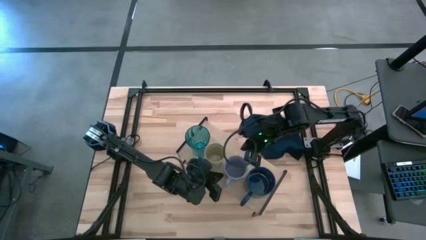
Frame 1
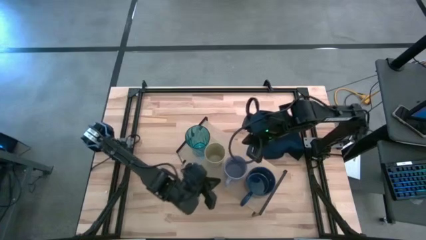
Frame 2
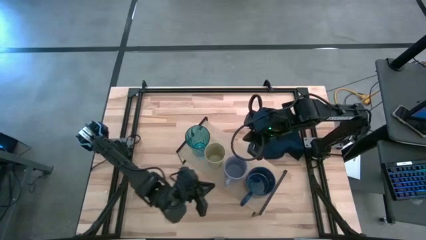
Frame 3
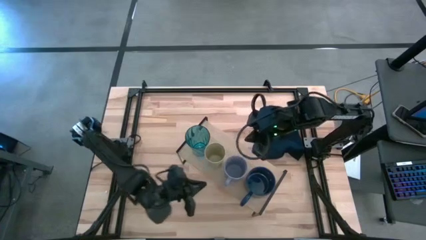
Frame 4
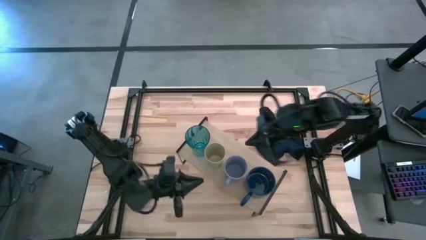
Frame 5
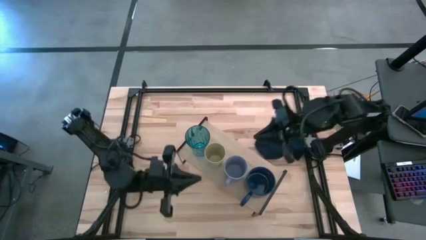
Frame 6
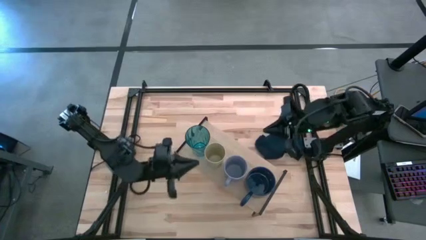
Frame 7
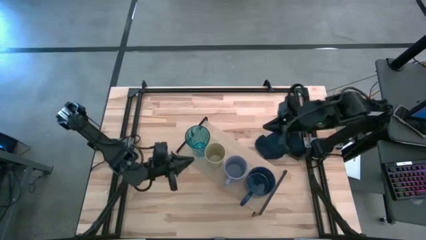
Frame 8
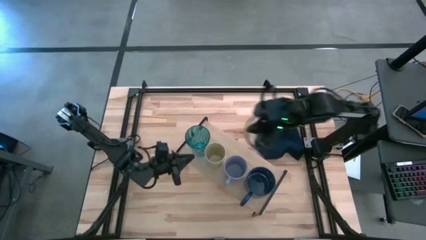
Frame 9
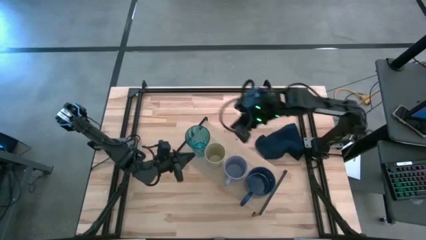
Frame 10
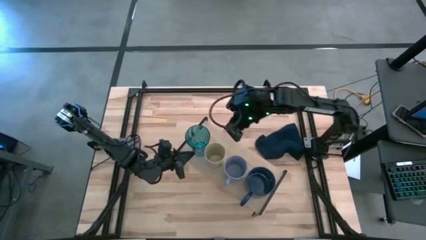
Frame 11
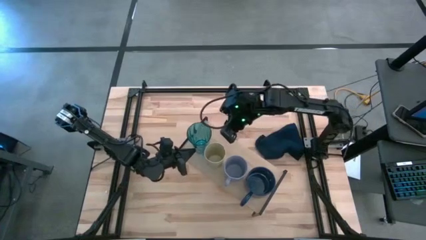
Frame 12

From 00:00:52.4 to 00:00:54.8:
Task: Stack small to large cups/mugs on shelf
Adjust the blue transparent cup on the shelf

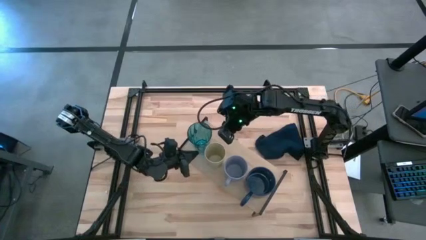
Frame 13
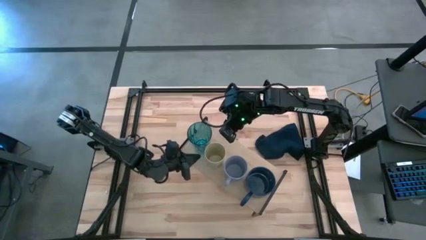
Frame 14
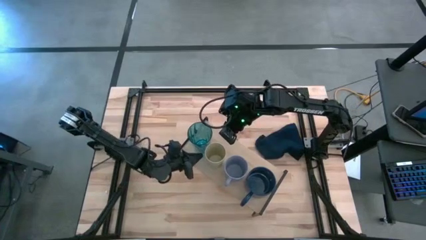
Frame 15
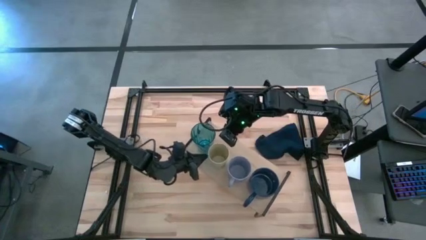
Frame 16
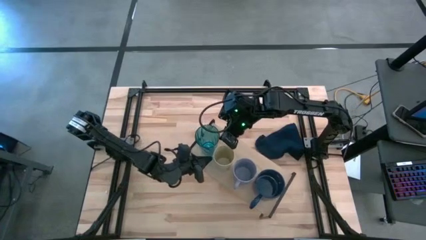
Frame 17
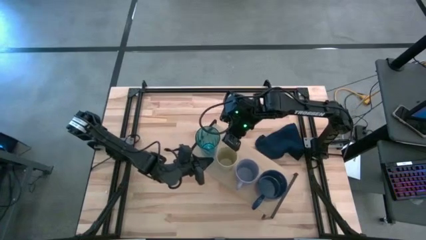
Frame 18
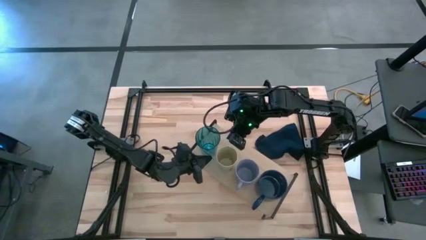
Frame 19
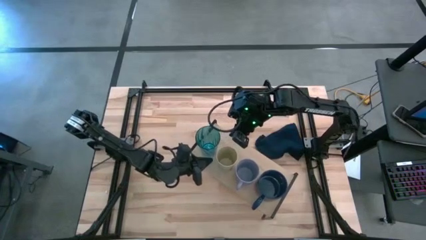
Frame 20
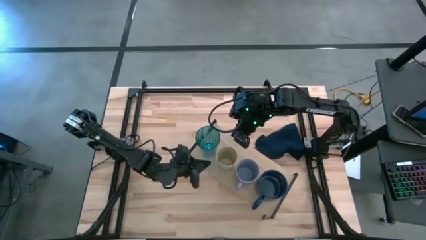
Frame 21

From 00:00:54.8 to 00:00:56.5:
Adjust the light brown shelf on the table

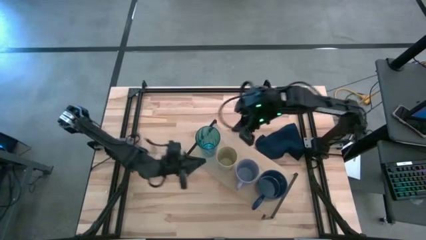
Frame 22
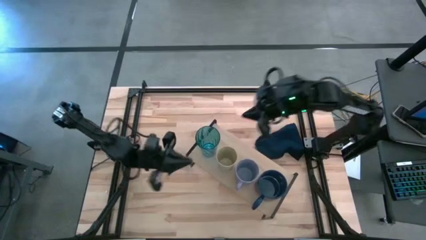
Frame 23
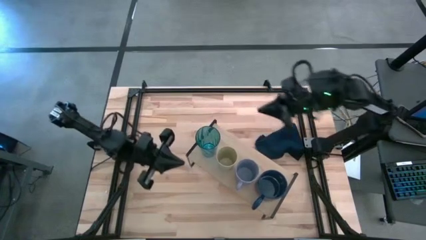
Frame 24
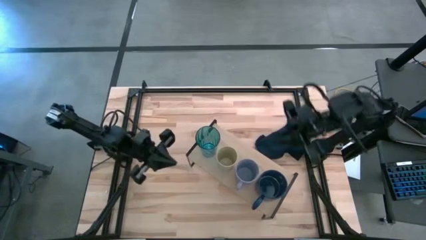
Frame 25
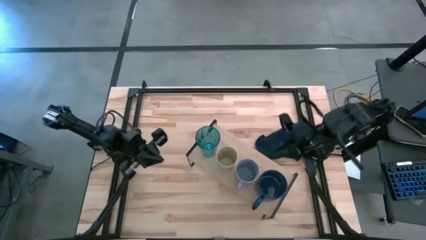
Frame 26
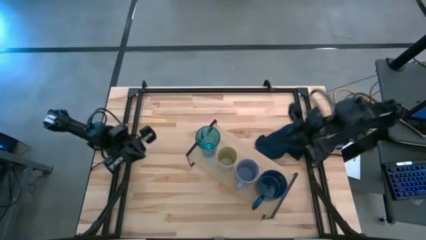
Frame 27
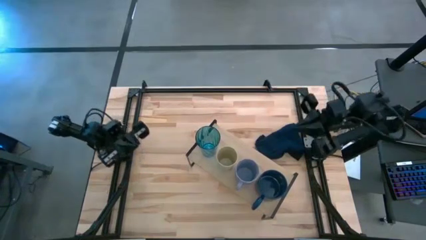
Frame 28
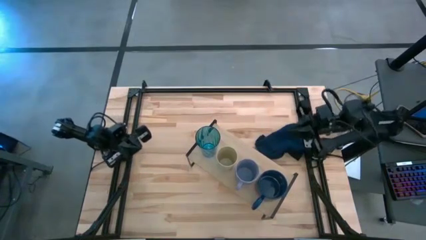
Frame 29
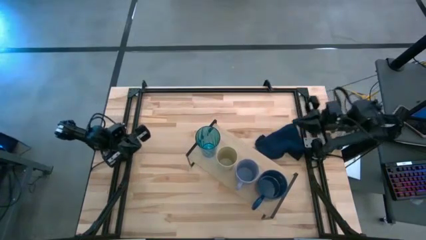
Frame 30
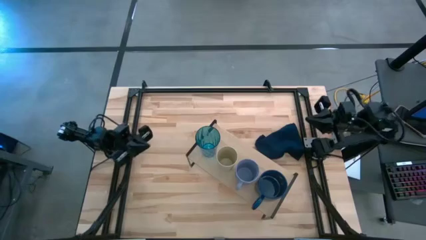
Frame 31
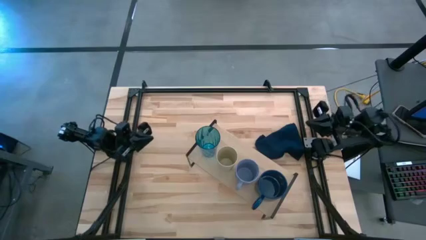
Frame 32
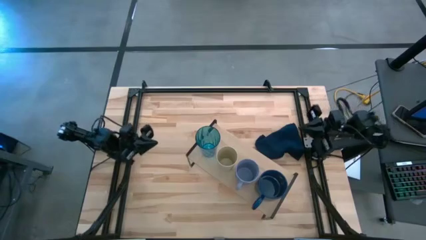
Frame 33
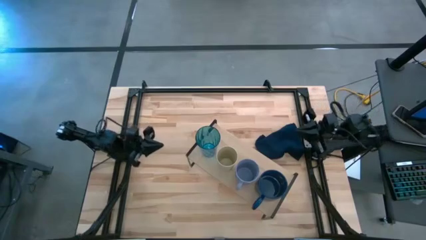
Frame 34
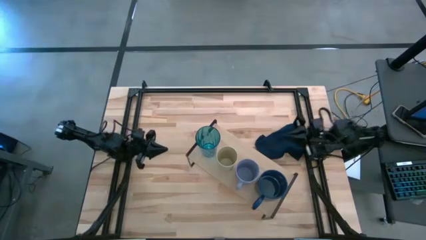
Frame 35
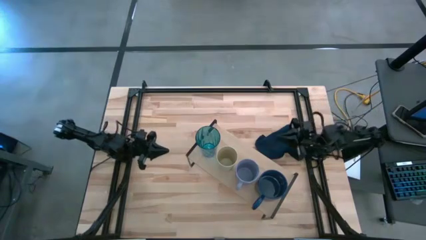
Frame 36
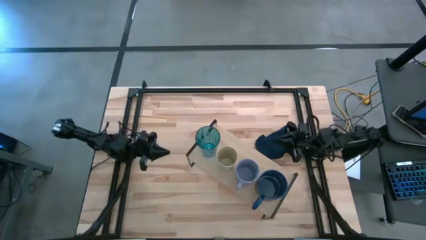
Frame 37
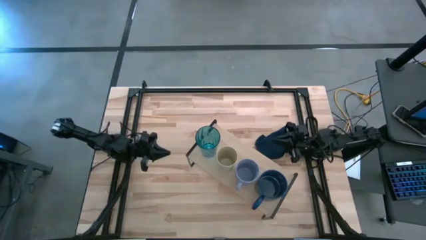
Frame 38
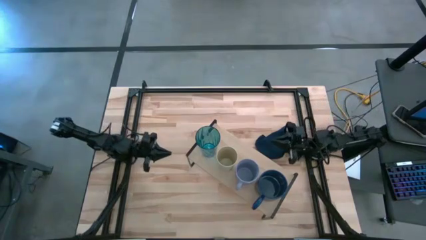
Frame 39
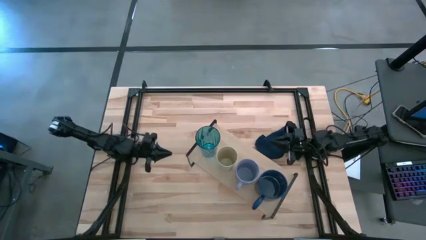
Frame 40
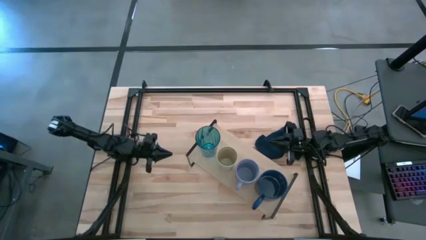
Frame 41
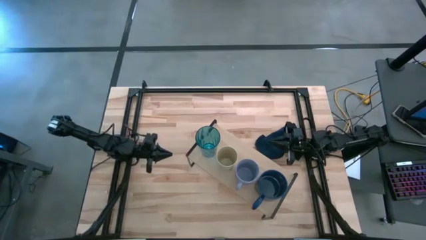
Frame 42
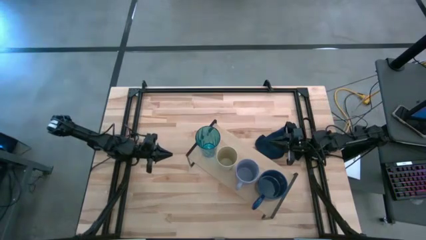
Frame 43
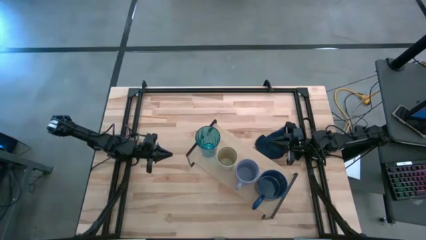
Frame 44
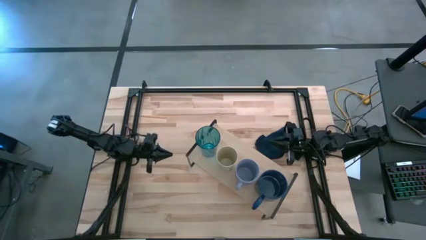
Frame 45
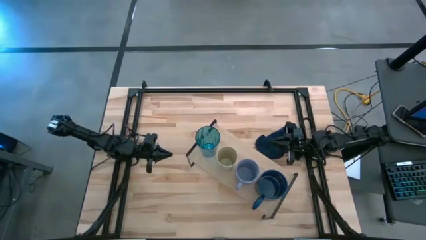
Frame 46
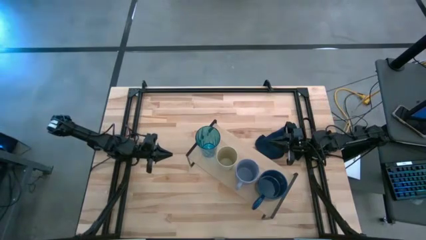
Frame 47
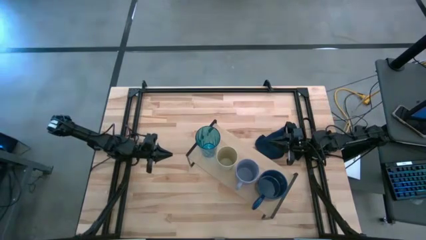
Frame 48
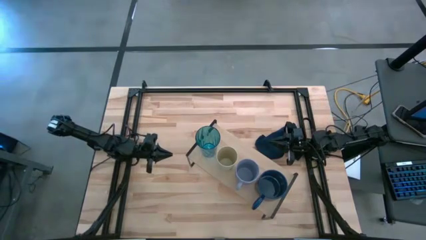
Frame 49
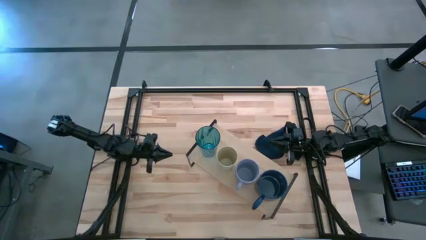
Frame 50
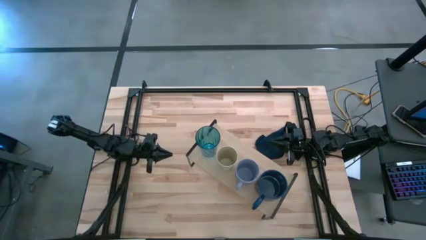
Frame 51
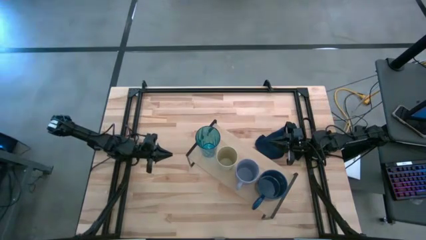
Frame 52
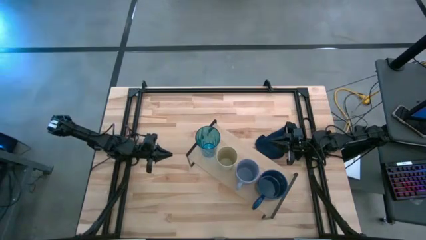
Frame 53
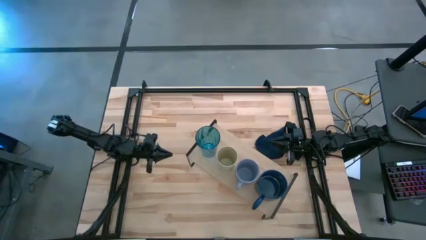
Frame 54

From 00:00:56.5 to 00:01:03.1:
Return to Home Position

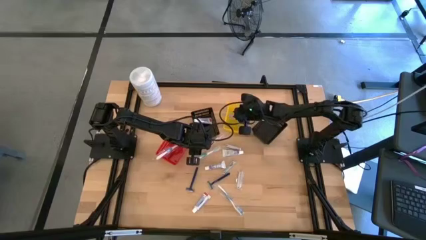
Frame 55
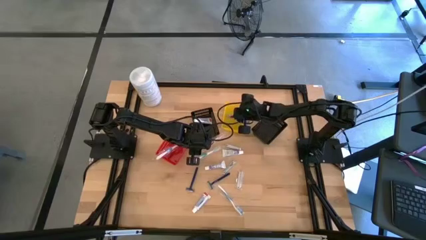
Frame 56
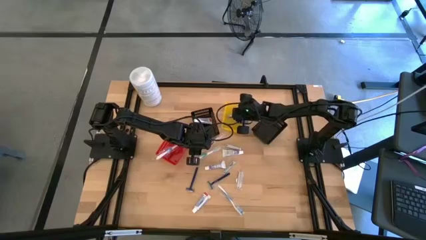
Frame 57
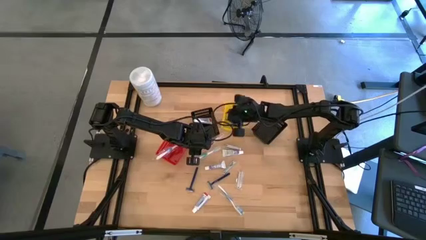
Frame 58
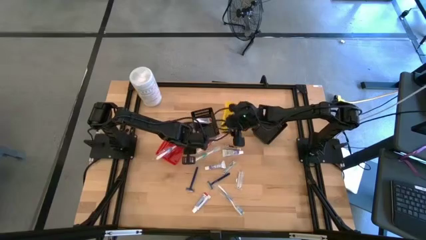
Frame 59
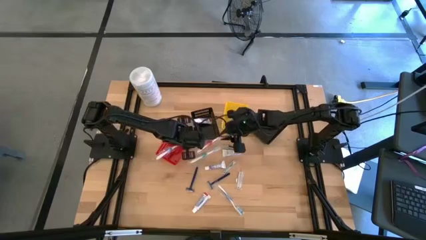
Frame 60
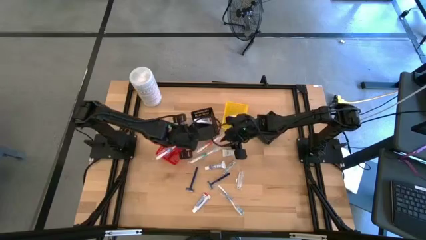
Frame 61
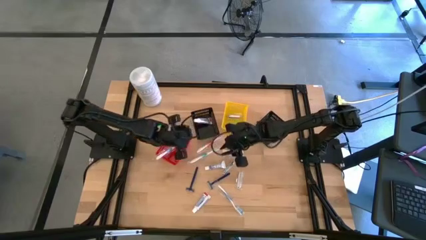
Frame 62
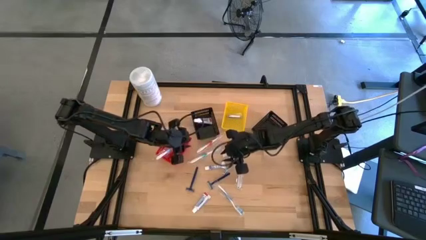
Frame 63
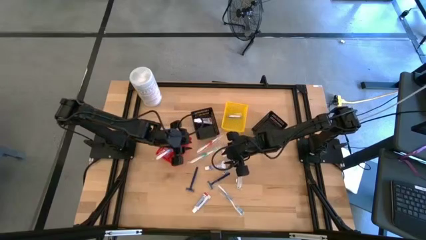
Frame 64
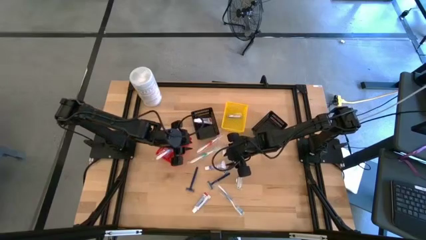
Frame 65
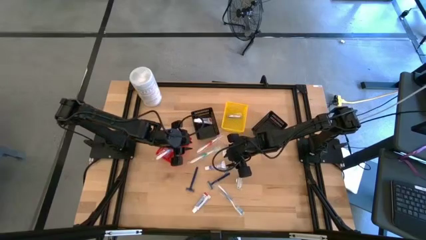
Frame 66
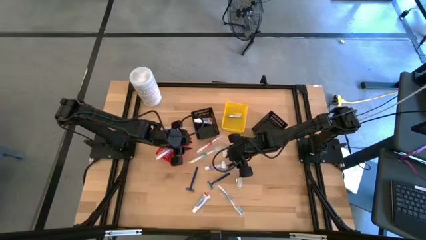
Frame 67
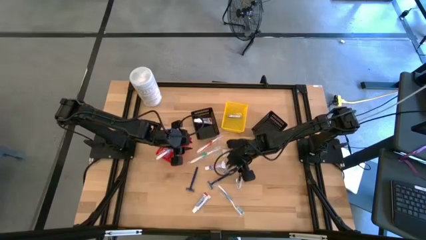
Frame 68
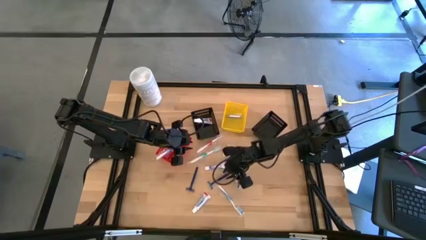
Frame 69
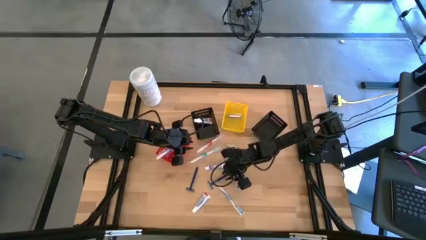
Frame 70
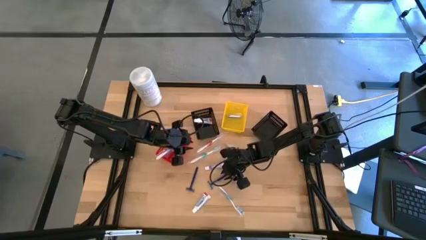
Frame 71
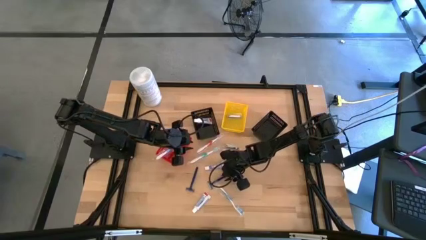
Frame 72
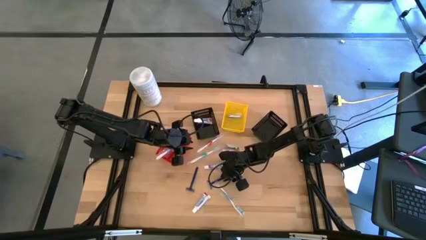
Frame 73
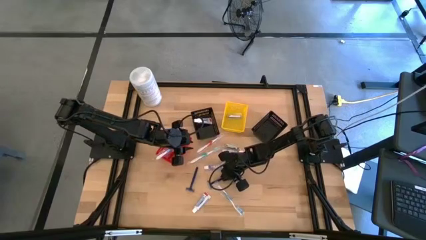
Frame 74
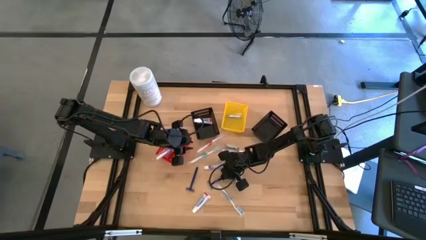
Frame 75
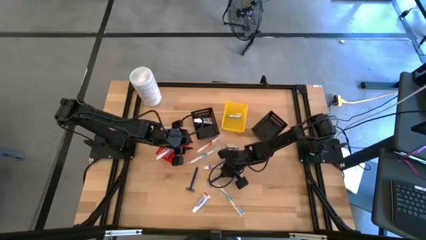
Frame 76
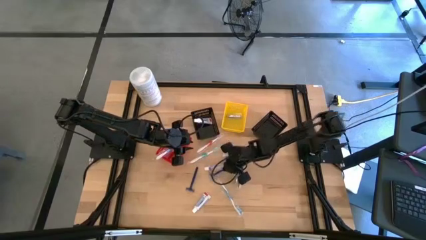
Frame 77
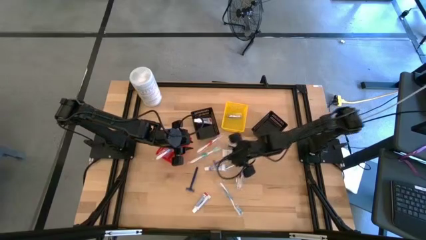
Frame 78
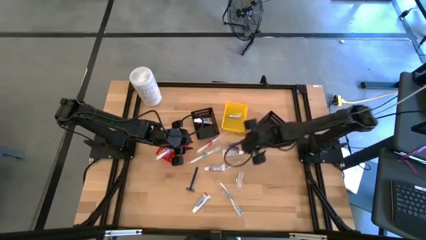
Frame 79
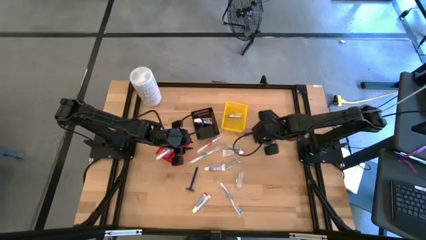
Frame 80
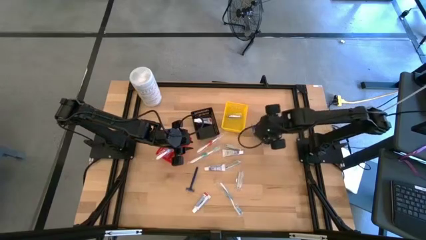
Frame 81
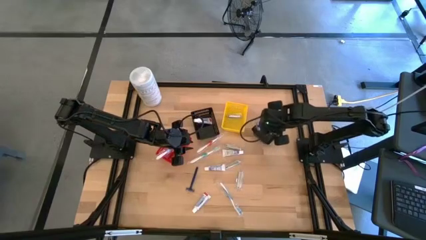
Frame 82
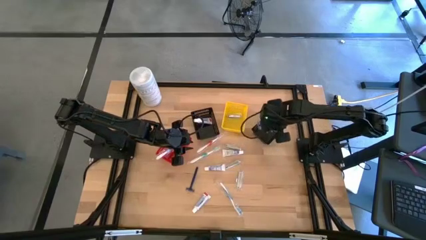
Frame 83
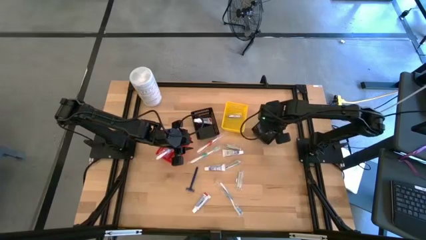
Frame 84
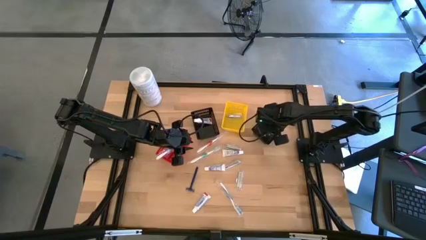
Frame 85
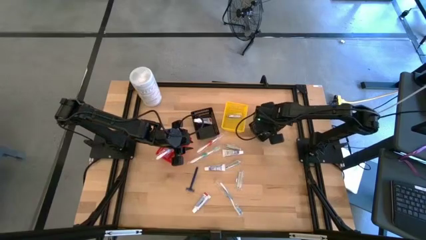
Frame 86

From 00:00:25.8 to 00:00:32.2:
Task: Pick & Place Travel size toiletries
Put the razor into the right black bin
